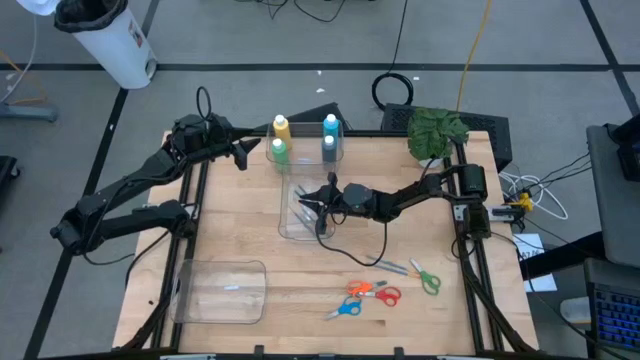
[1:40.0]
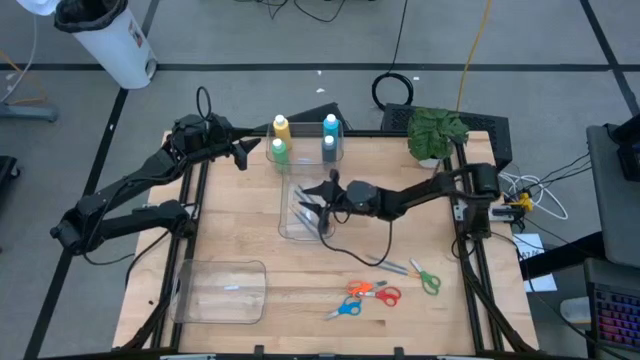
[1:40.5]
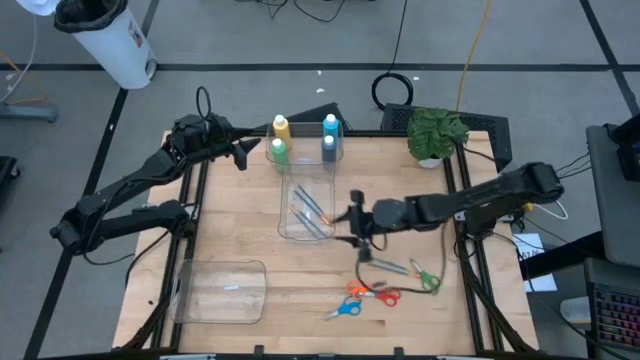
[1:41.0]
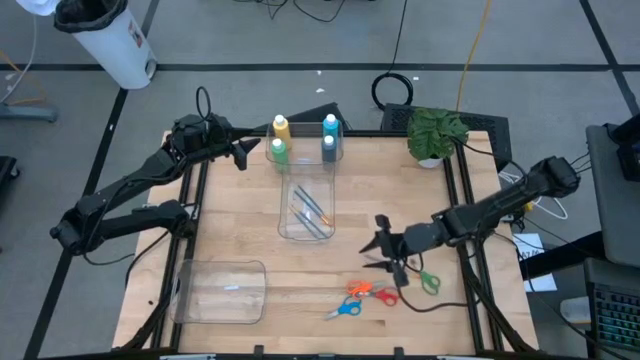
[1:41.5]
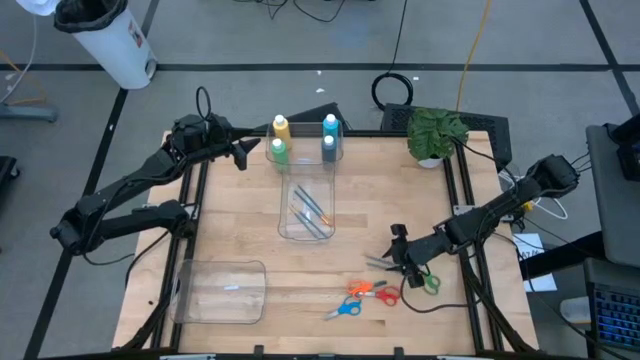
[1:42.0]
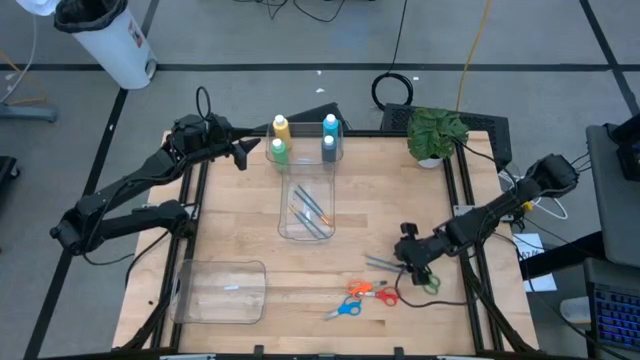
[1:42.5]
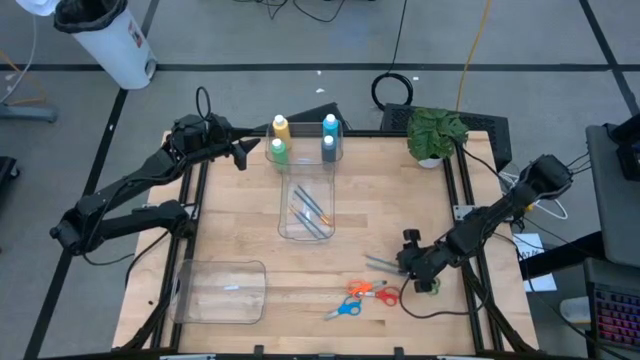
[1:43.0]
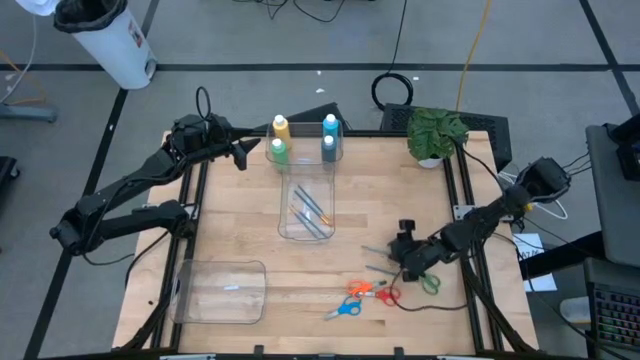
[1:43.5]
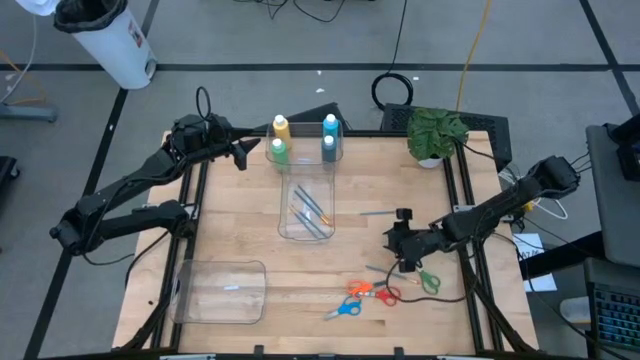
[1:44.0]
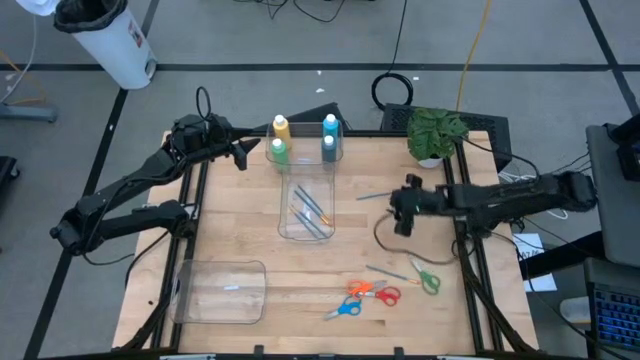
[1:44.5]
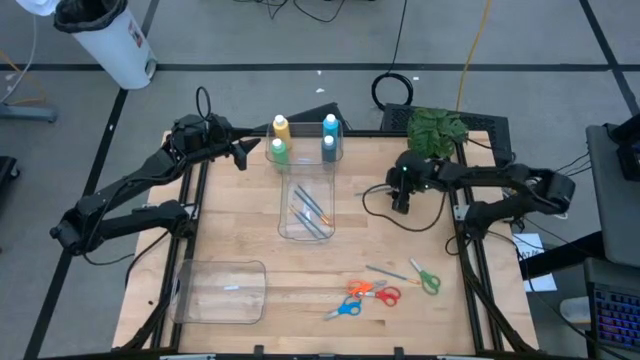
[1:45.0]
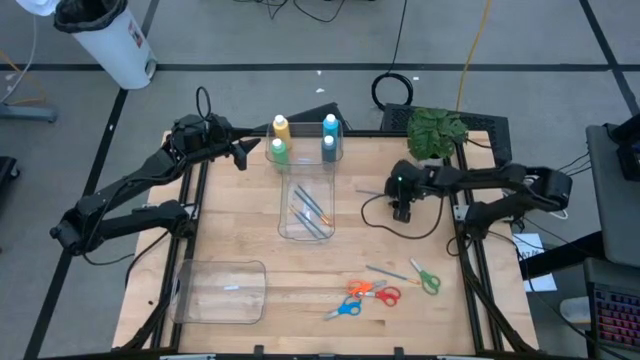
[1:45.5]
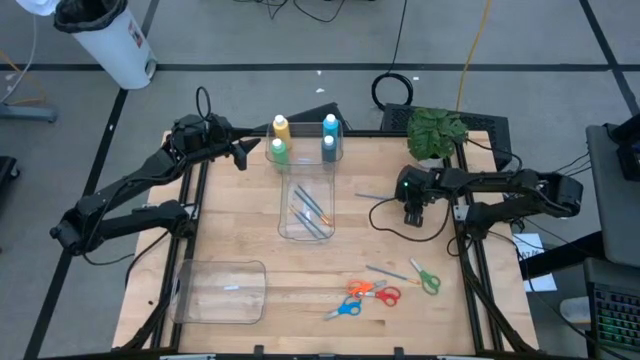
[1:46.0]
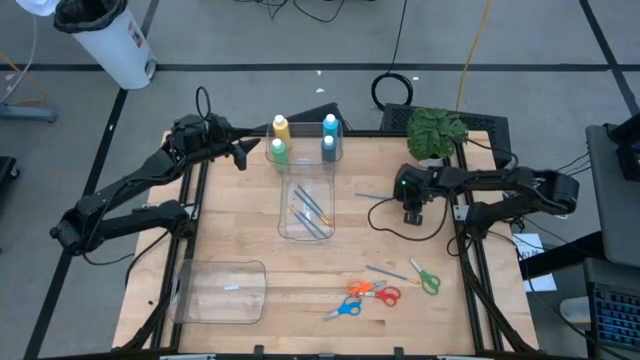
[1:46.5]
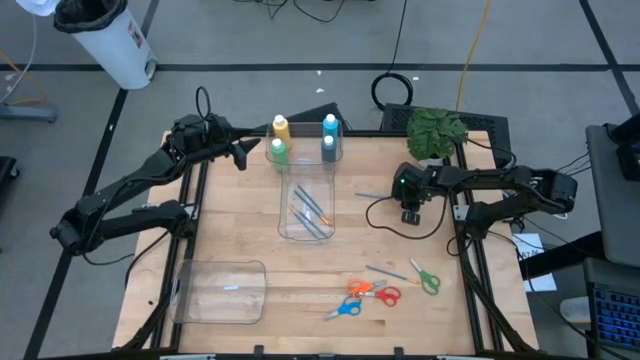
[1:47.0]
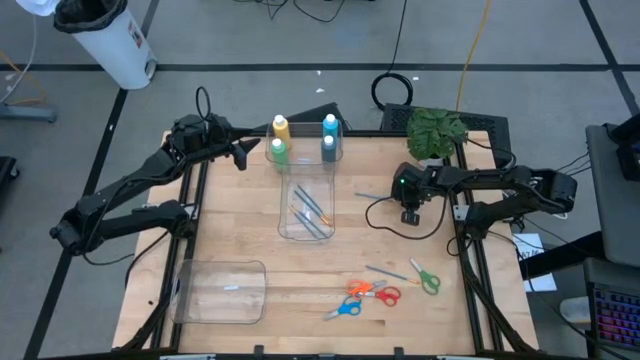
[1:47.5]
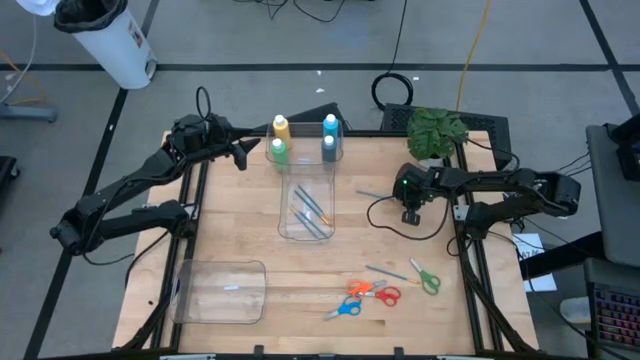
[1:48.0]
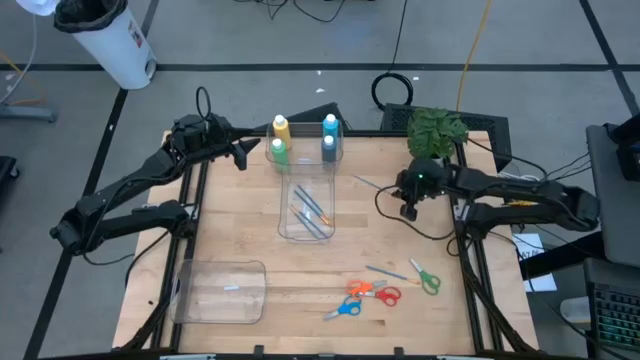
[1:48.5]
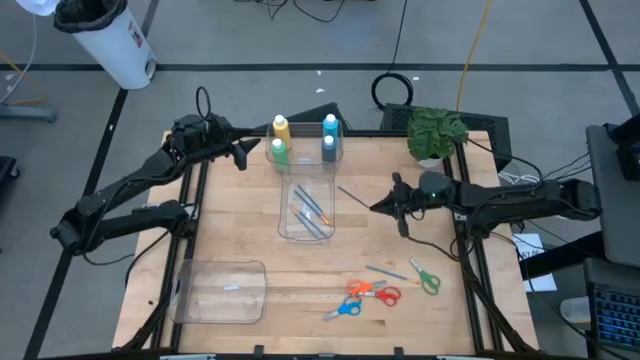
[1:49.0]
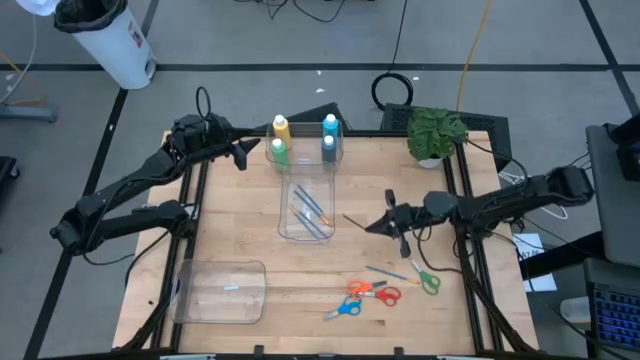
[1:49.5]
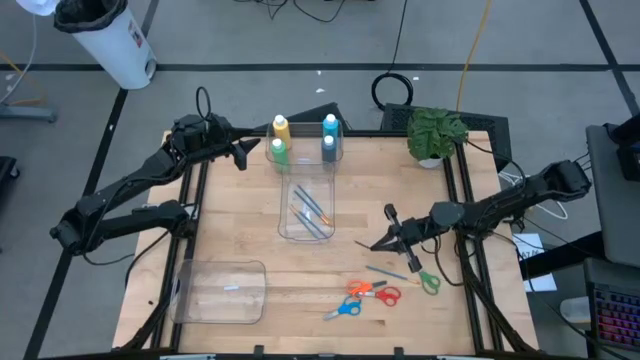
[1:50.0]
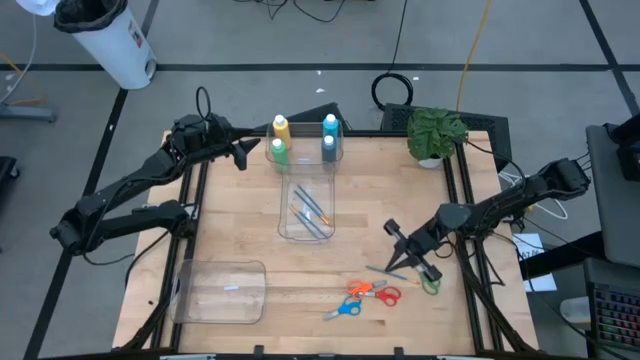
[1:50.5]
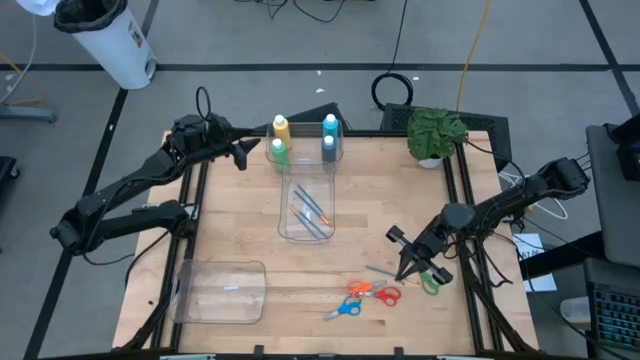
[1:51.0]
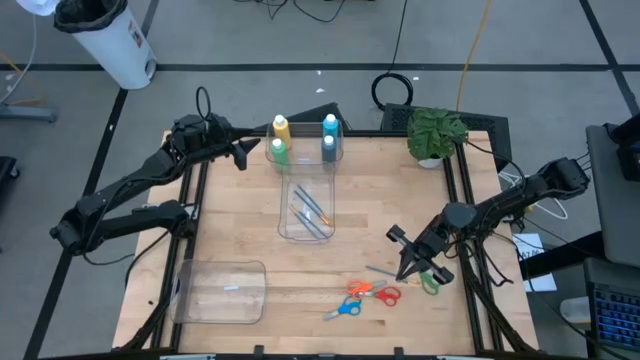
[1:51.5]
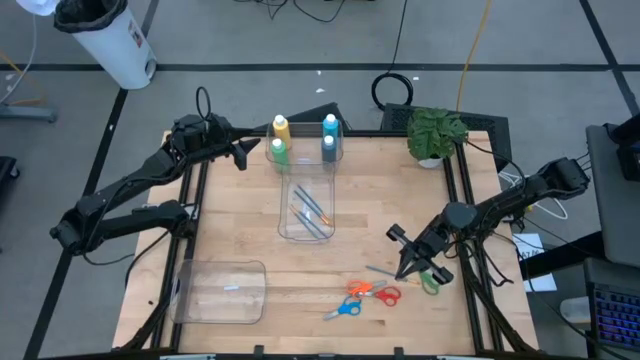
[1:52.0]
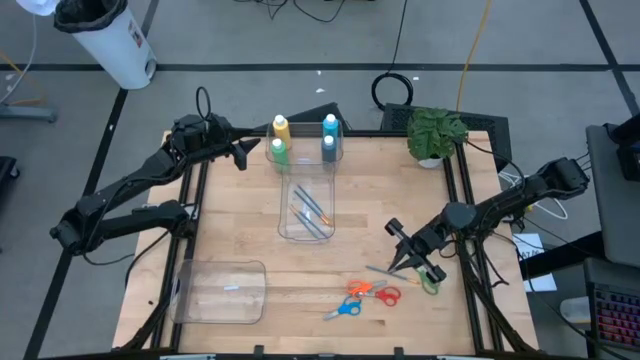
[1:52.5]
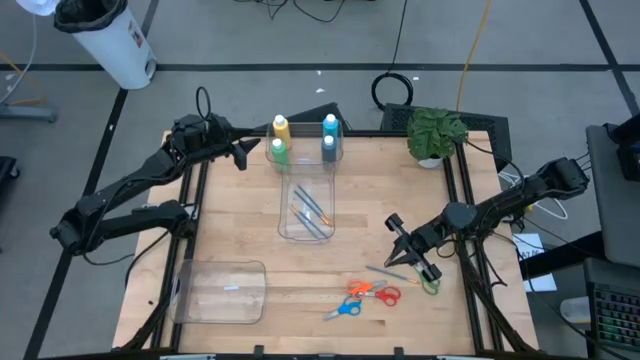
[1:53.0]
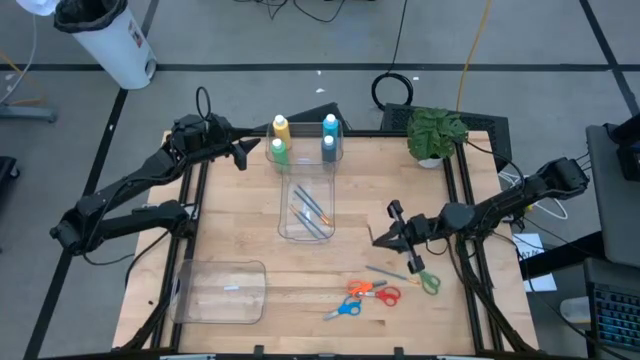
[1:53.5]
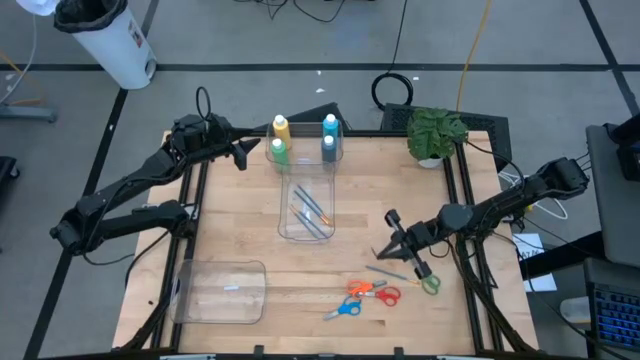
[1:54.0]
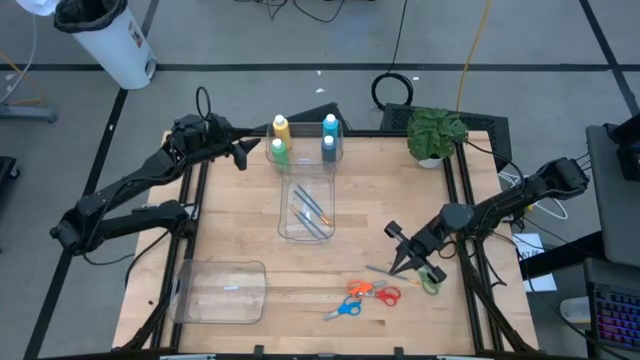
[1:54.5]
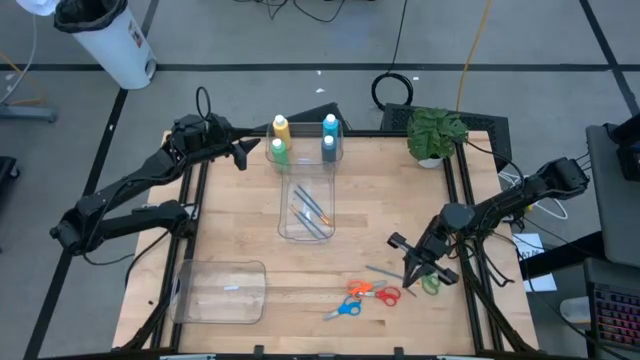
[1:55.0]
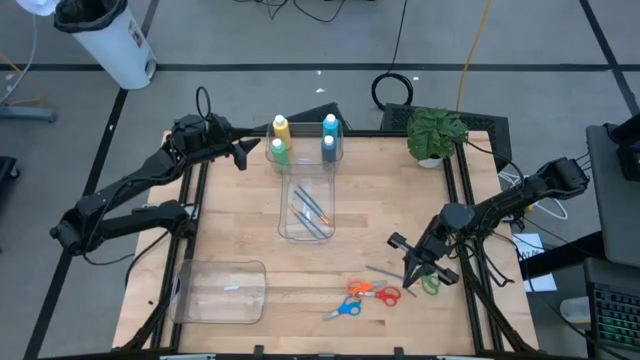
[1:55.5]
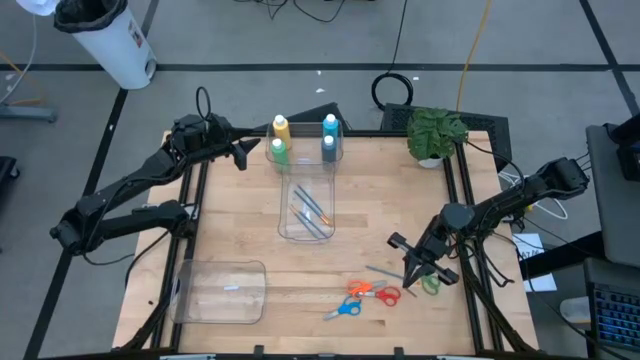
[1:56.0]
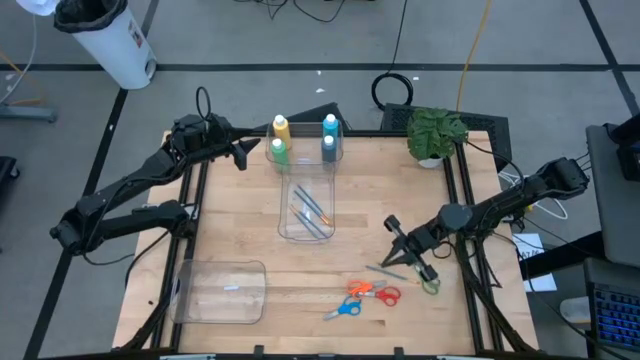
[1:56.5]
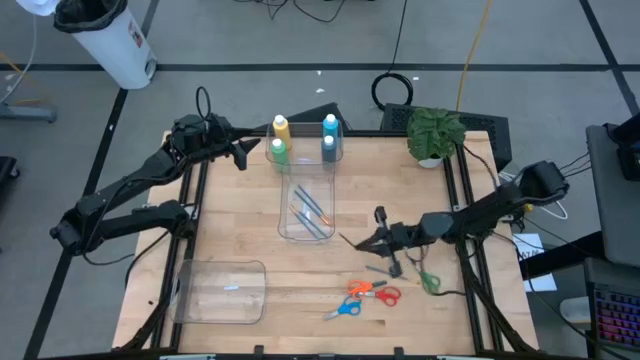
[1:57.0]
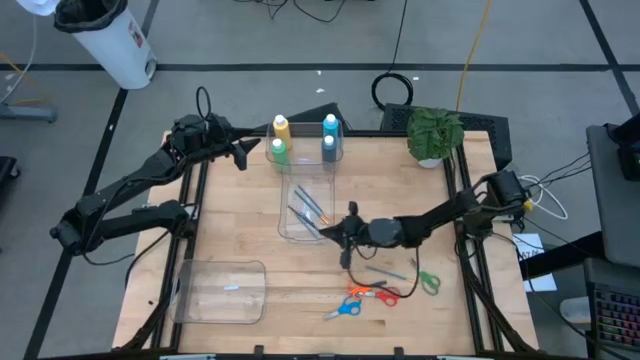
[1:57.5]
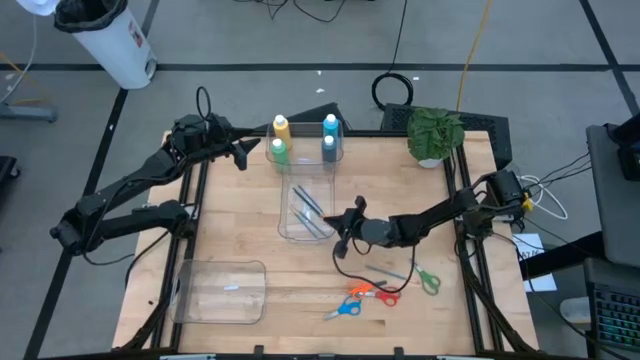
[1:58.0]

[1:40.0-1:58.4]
Task: Pick & Place Paint Supplies
Put the blue paintbrush into the middle transparent bin

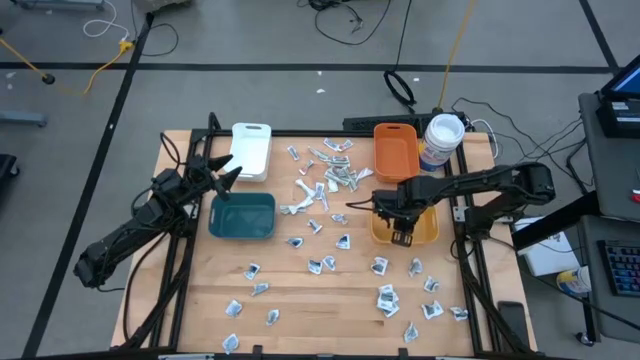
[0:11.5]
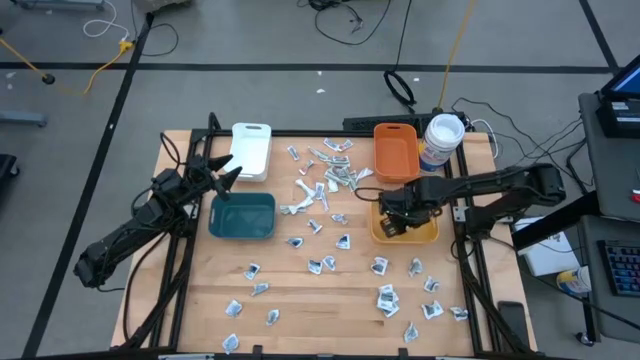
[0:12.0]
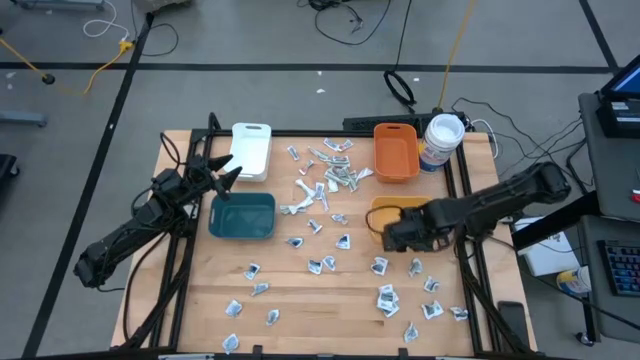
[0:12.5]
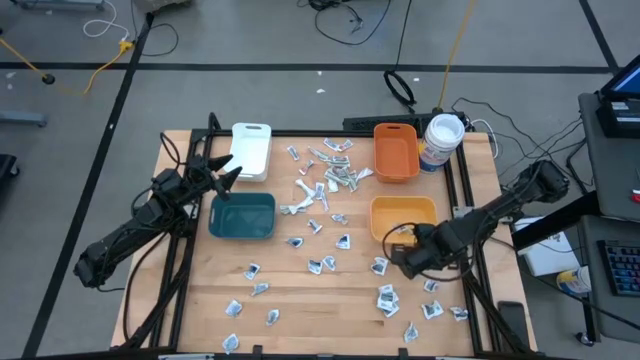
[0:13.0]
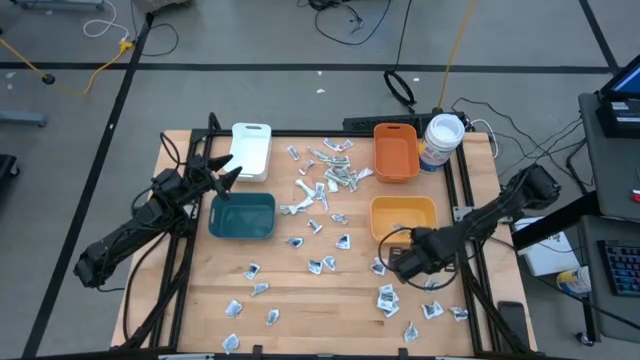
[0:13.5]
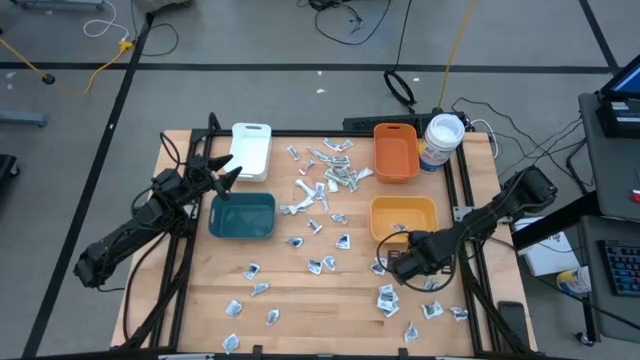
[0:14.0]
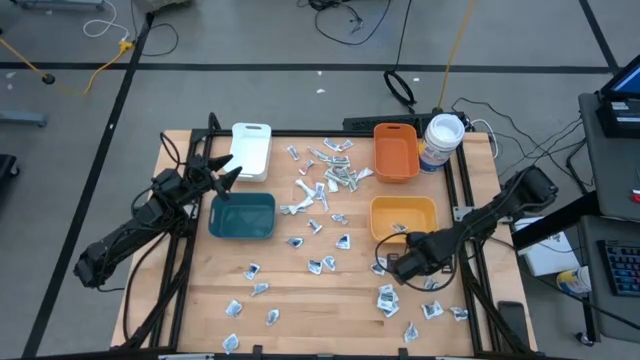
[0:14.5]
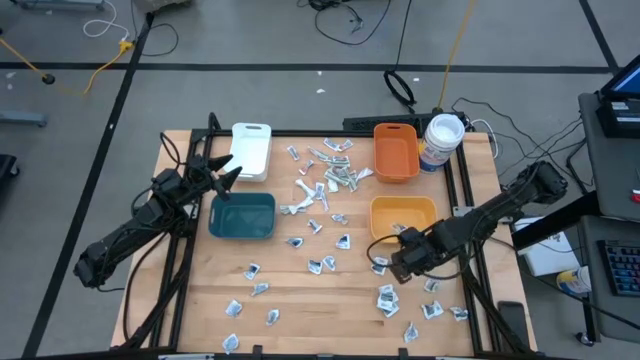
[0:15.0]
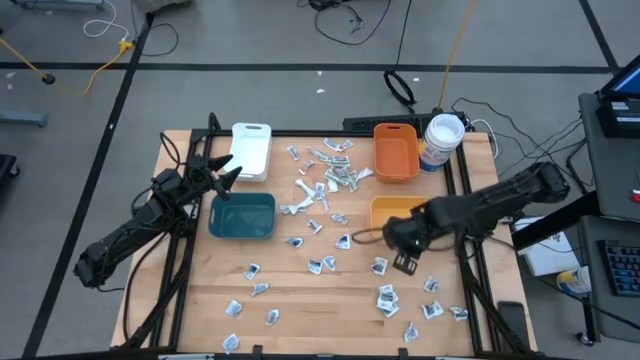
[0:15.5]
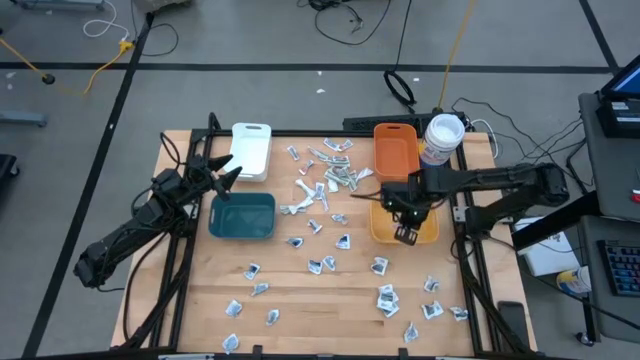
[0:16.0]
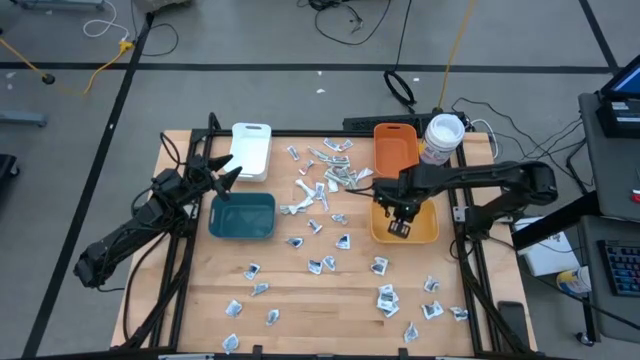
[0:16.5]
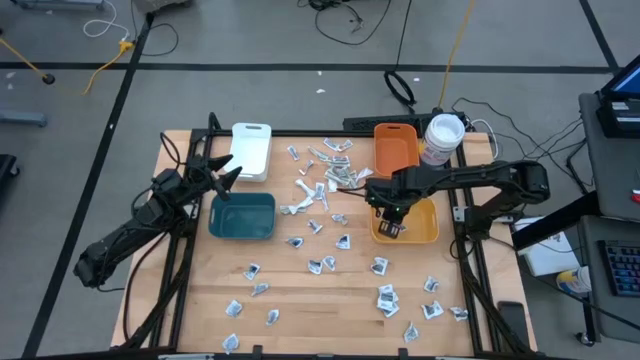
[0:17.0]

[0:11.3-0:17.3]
Task: Pick & Place First Aid Supplies
Put the antiseptic towelette into the yellow bin
